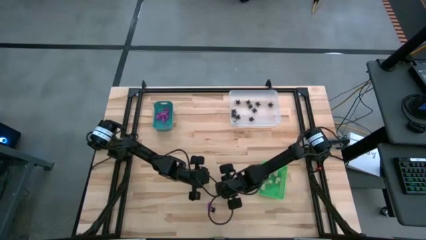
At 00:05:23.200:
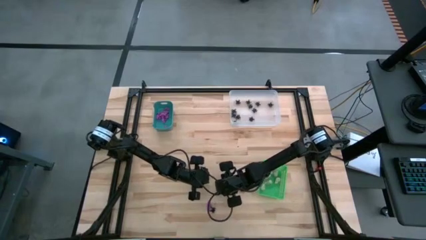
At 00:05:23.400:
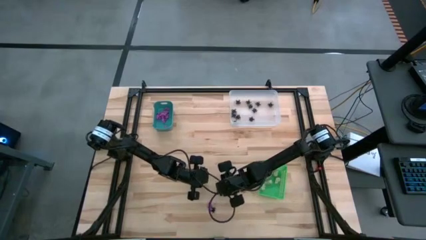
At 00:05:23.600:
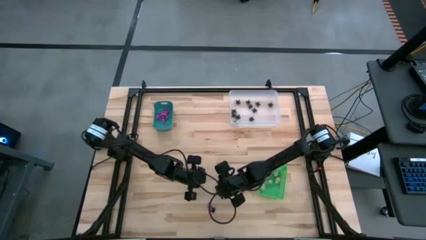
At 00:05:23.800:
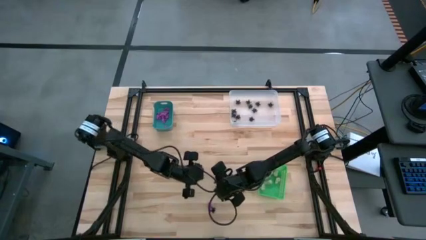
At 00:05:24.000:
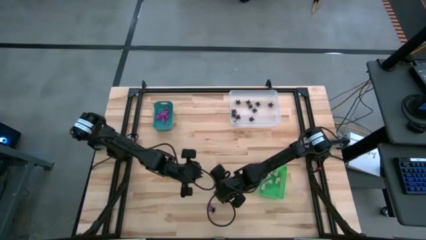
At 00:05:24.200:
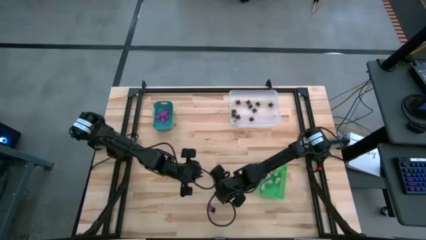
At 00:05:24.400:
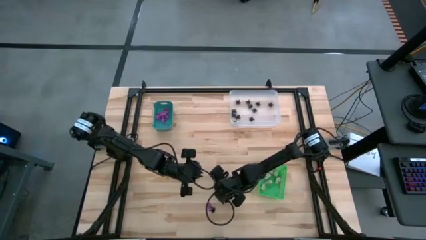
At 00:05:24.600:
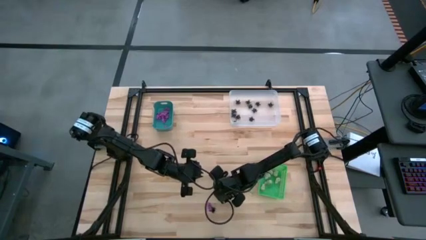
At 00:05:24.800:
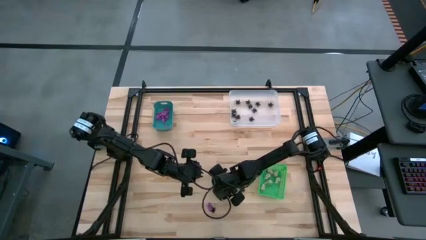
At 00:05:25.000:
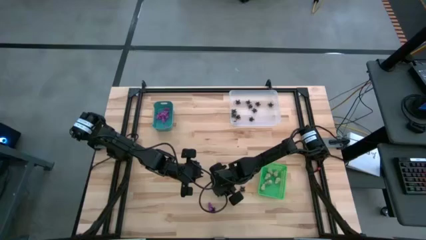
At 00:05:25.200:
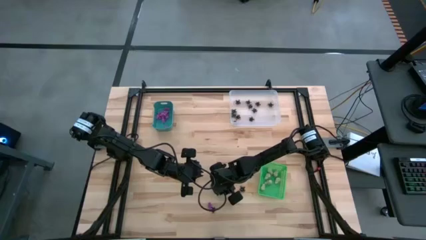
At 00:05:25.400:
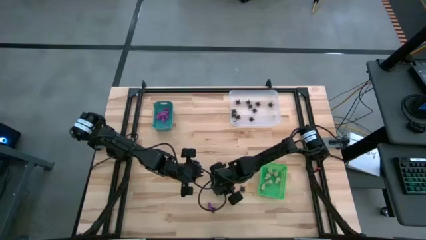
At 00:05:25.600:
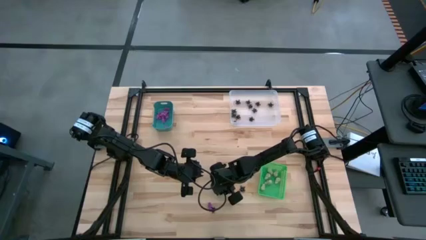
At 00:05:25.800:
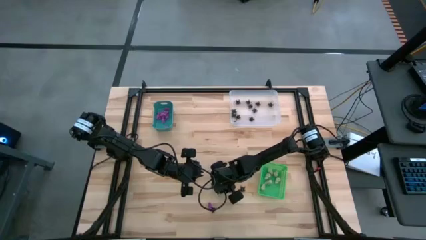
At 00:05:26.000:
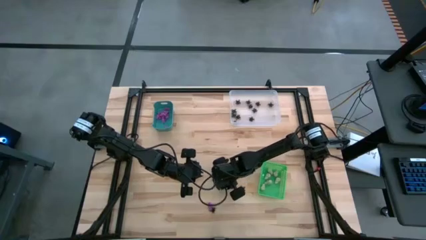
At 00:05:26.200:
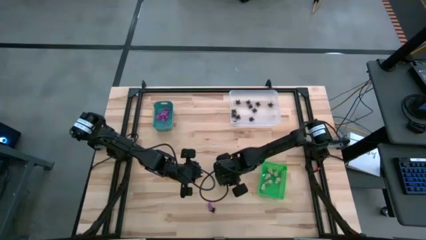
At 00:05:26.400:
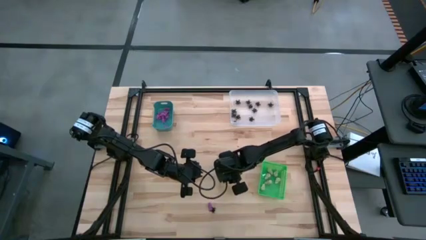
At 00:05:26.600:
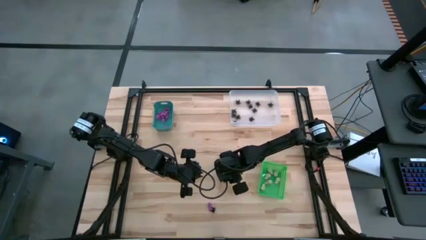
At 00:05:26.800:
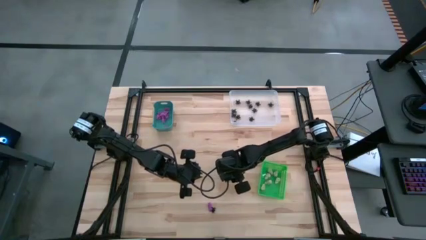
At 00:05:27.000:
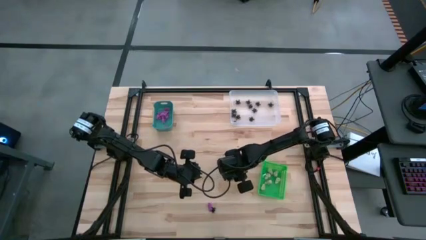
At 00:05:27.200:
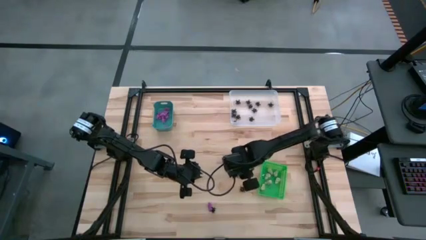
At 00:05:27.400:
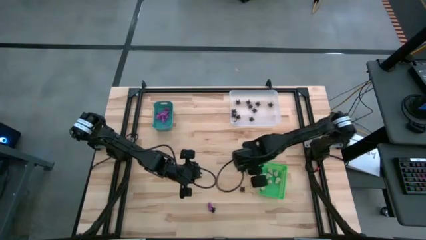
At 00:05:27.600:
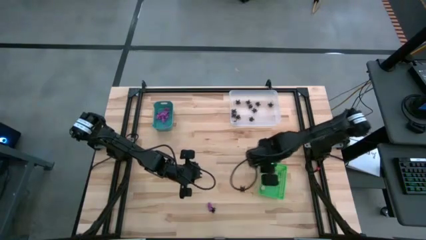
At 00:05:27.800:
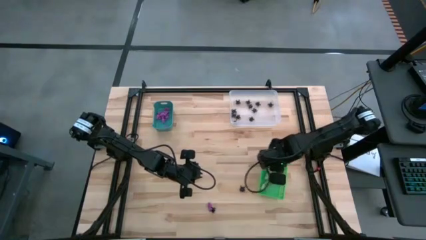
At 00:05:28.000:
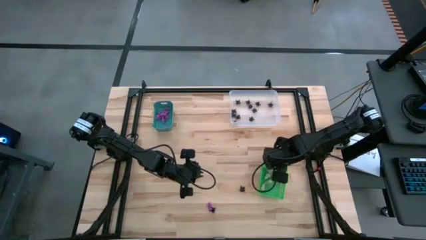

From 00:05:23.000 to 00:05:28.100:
Task: Sort Halloween decoration
Put the white skull toy into the green bin

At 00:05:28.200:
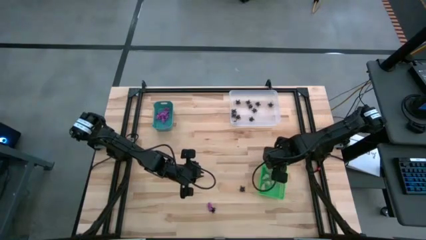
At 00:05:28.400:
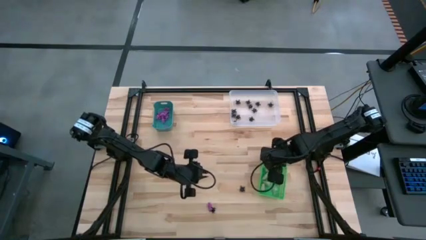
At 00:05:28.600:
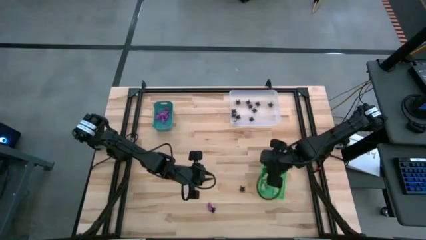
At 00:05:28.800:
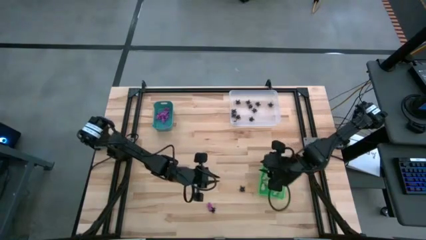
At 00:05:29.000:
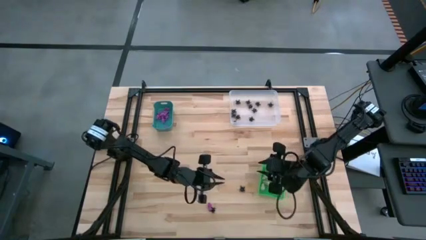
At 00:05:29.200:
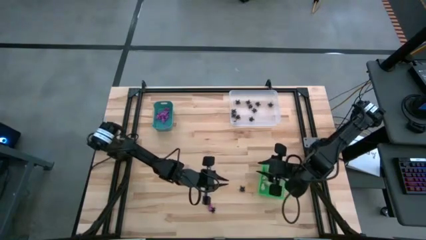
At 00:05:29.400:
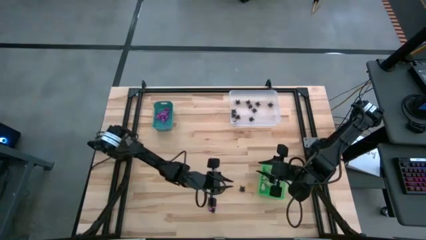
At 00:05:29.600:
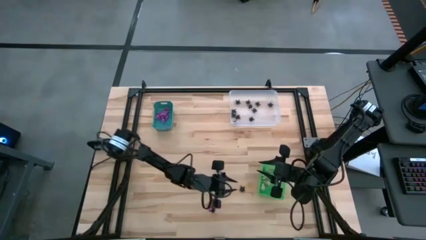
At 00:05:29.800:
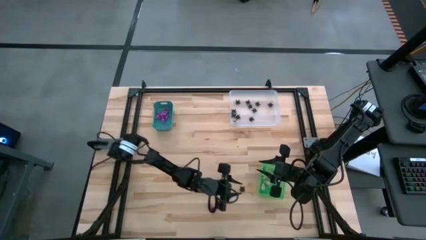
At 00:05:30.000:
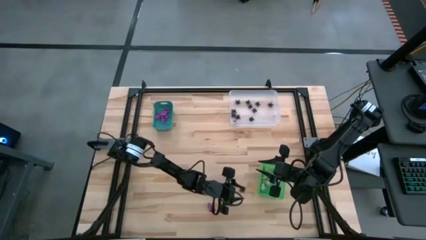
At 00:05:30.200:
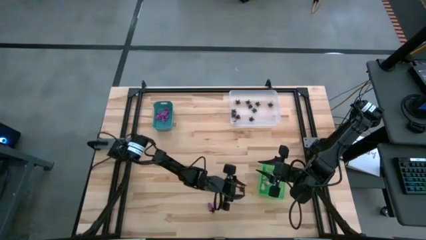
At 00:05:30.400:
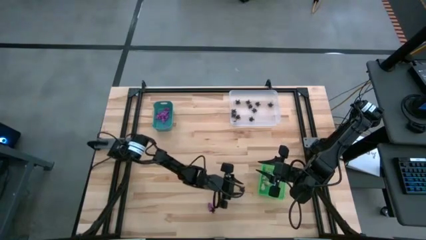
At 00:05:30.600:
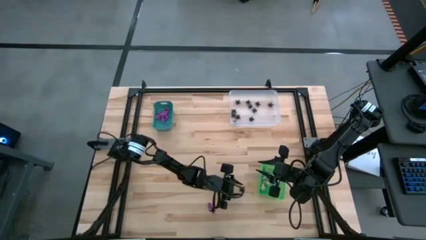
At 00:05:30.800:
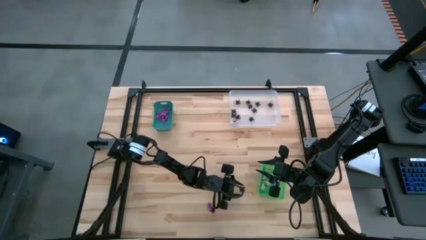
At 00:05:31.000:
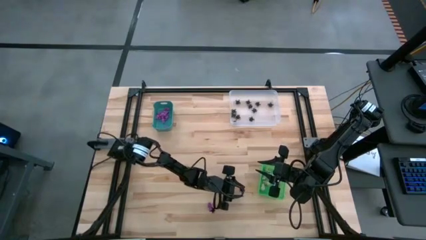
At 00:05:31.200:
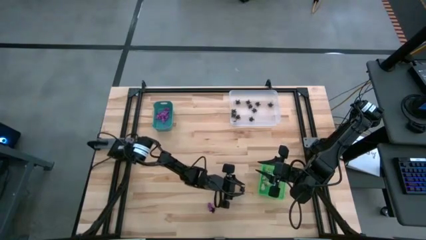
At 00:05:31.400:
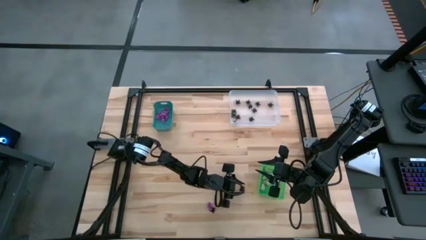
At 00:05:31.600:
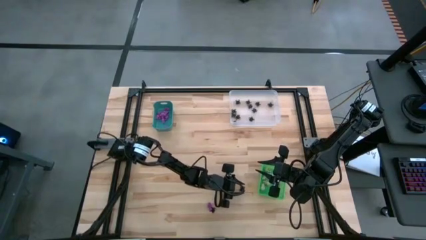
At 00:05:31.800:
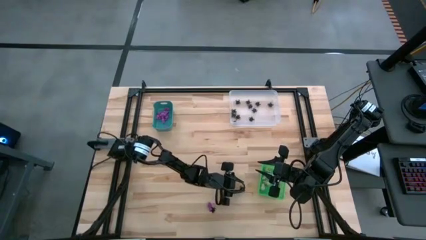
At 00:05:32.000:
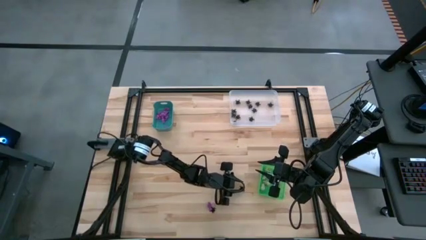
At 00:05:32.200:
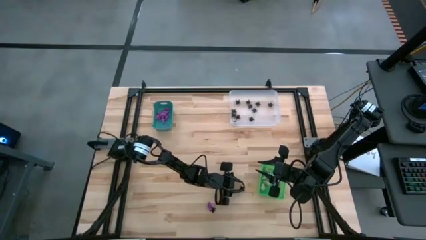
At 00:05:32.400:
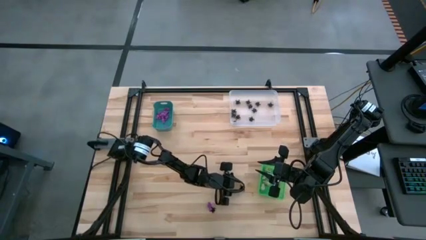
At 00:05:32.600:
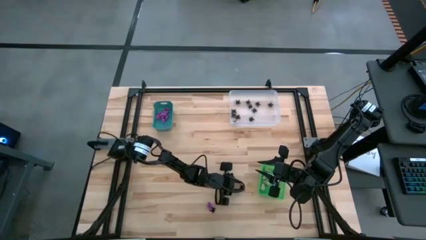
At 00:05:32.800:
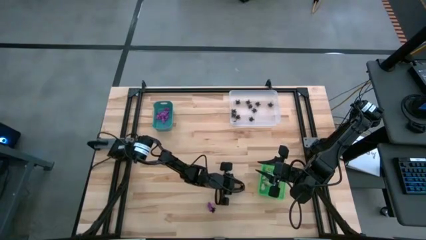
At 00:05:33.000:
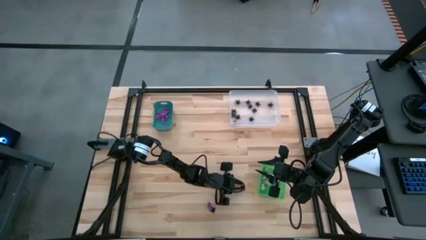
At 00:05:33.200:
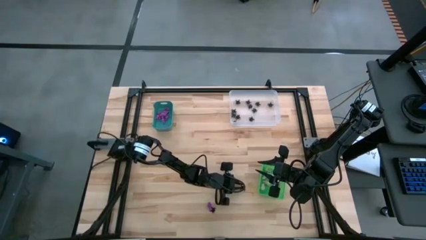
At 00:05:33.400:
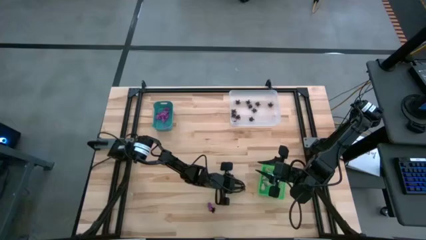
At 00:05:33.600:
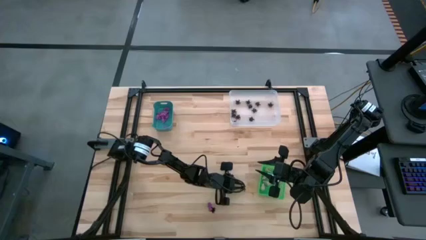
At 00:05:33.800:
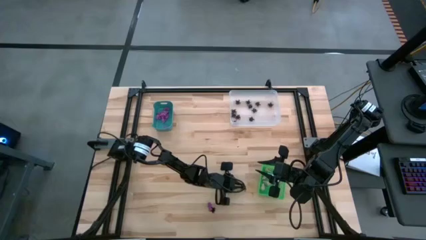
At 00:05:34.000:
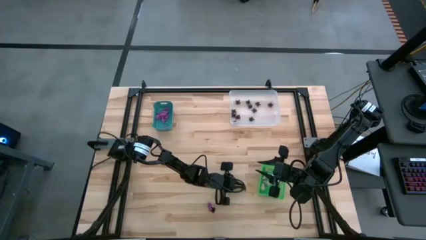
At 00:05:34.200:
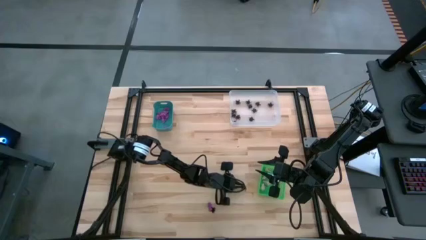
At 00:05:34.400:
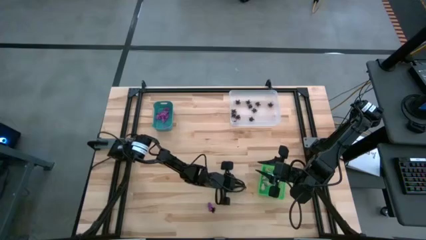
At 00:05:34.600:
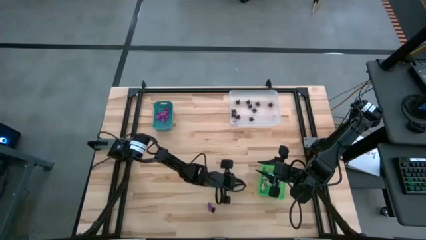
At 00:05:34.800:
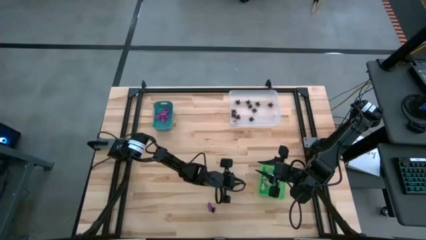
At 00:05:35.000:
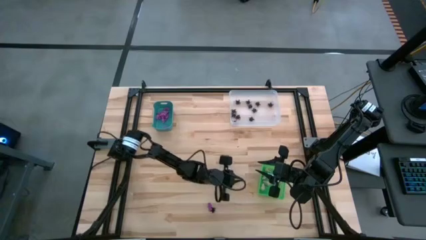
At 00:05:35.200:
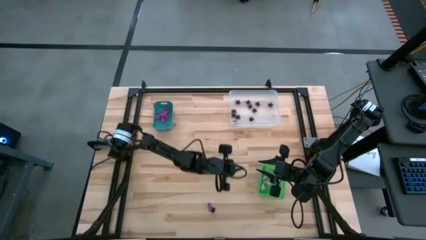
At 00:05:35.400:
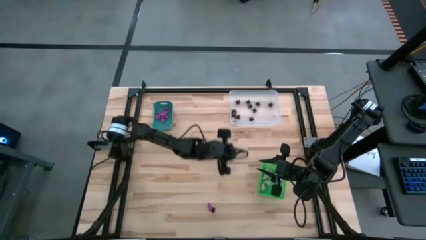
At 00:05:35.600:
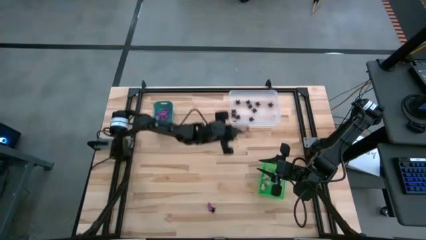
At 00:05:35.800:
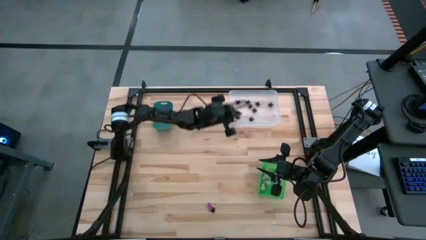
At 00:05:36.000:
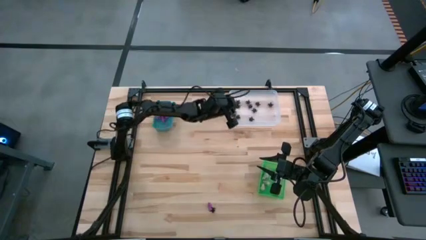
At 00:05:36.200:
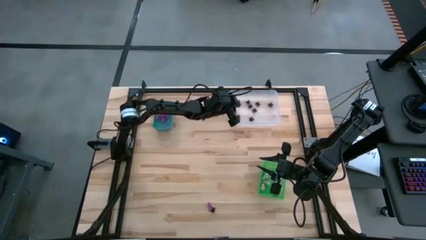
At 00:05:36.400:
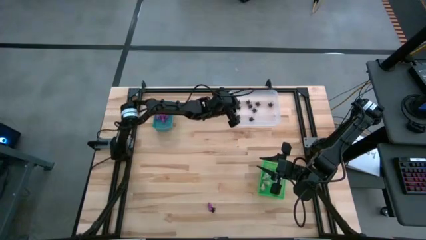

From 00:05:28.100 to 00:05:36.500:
Put the black spider toy into the white bin
